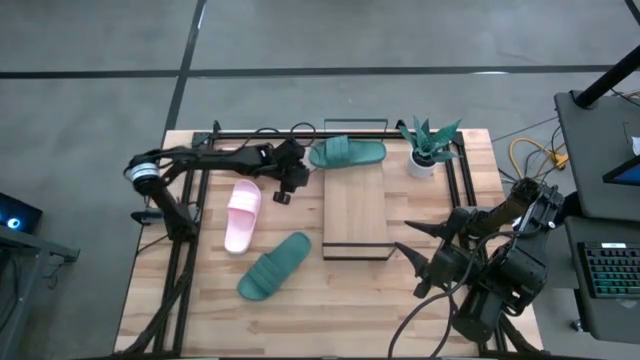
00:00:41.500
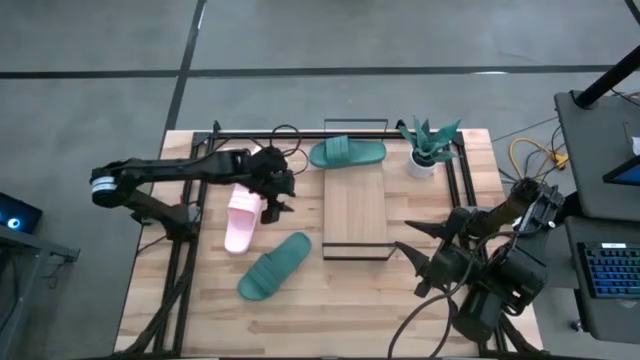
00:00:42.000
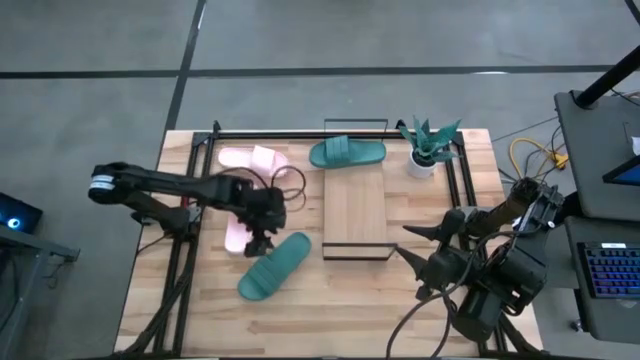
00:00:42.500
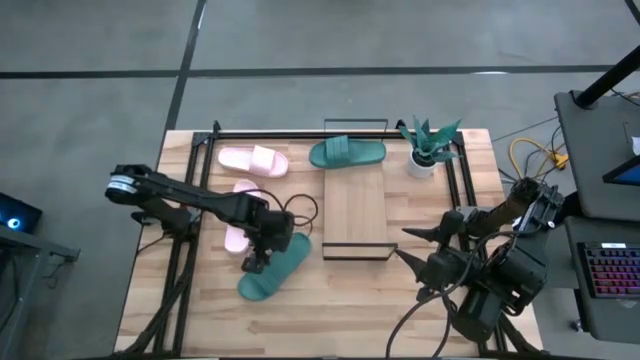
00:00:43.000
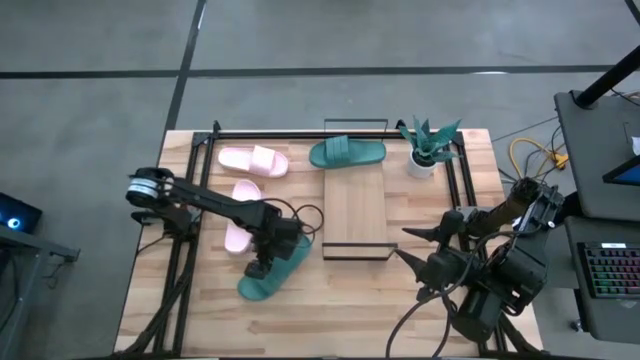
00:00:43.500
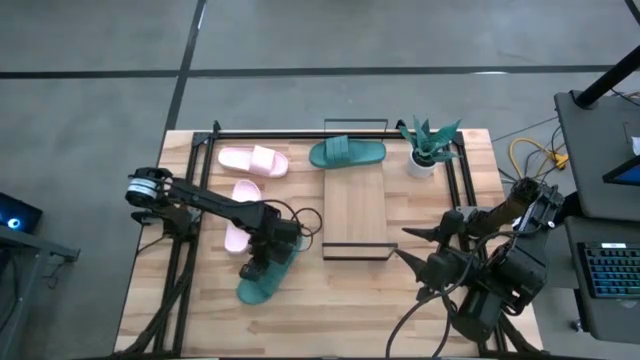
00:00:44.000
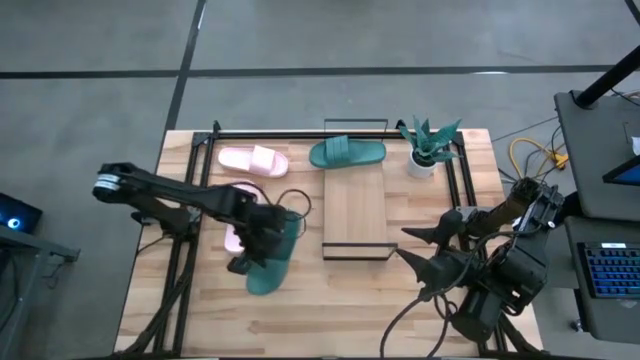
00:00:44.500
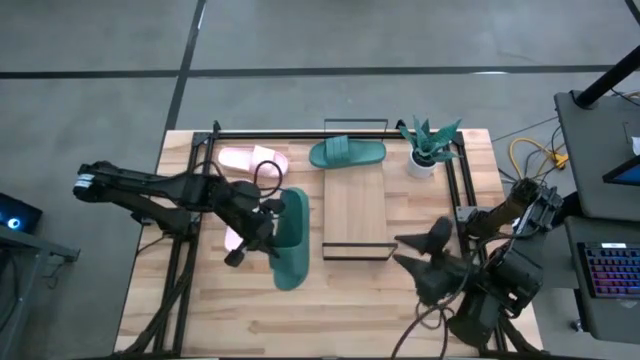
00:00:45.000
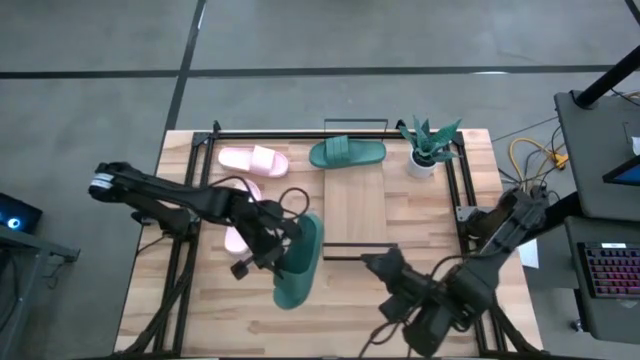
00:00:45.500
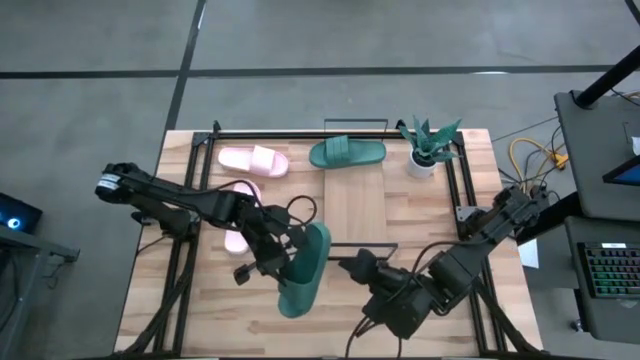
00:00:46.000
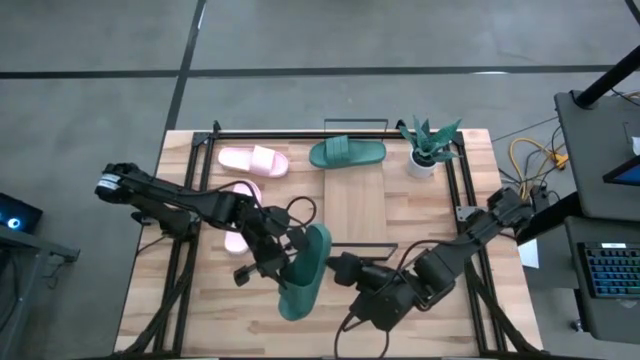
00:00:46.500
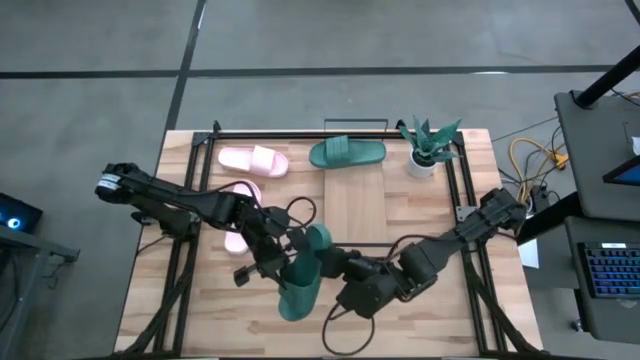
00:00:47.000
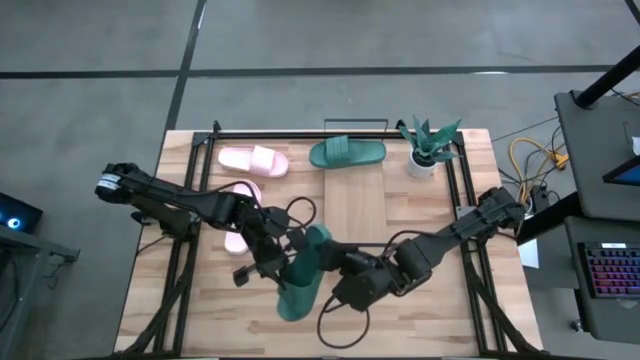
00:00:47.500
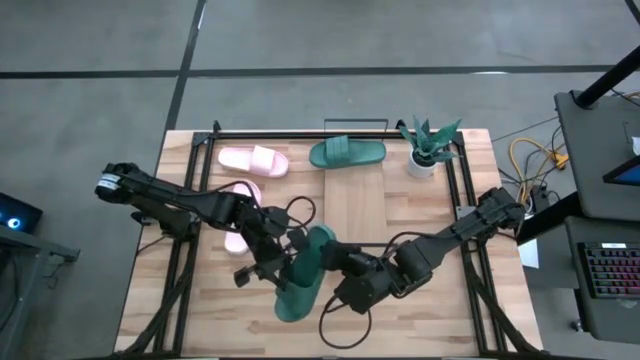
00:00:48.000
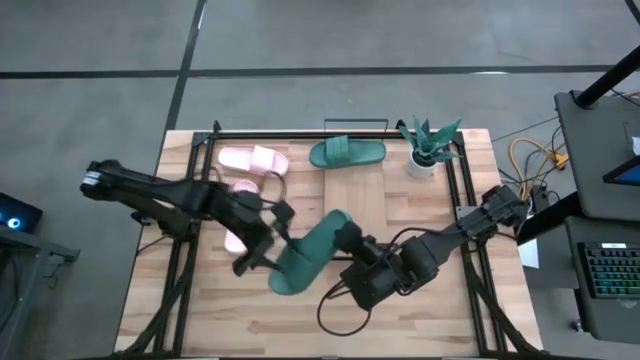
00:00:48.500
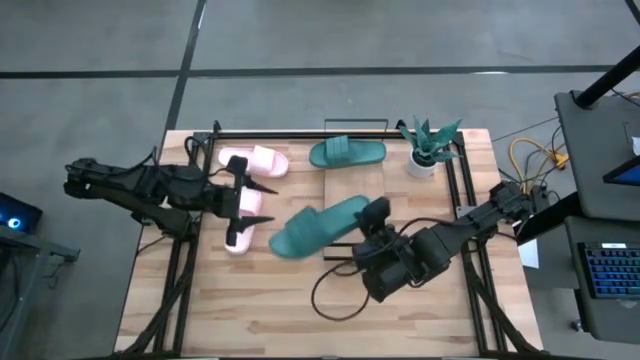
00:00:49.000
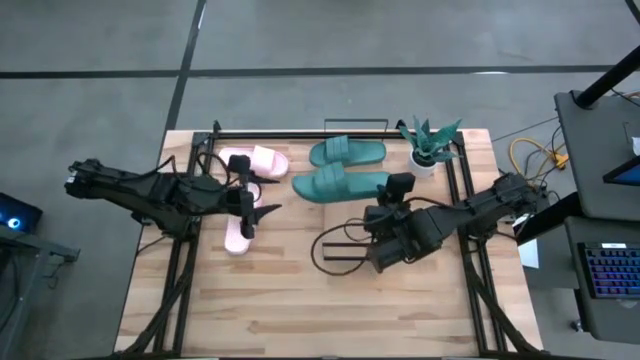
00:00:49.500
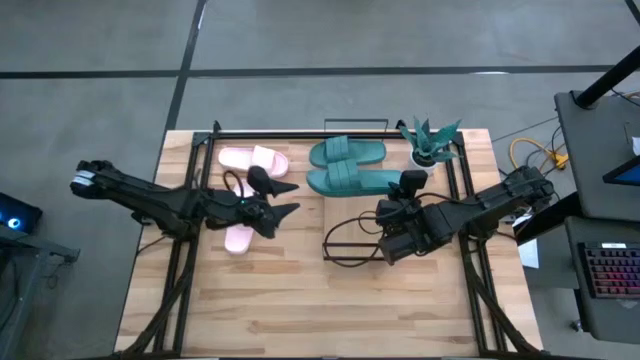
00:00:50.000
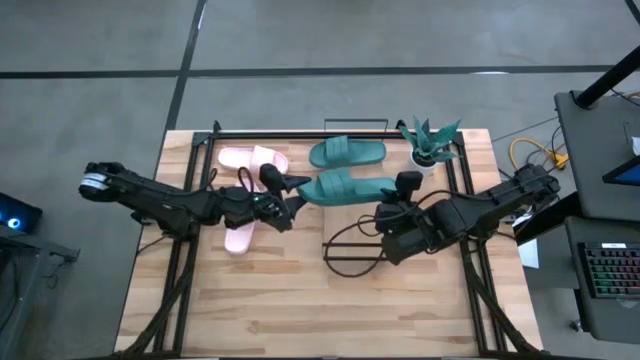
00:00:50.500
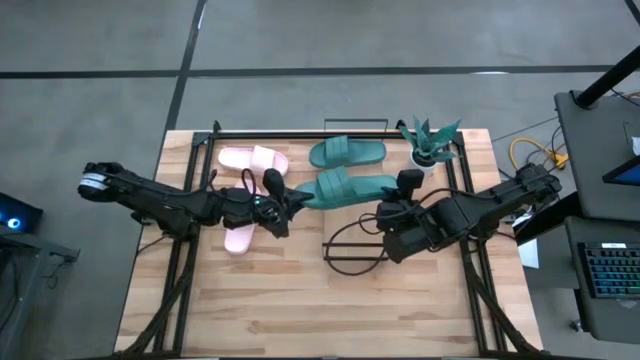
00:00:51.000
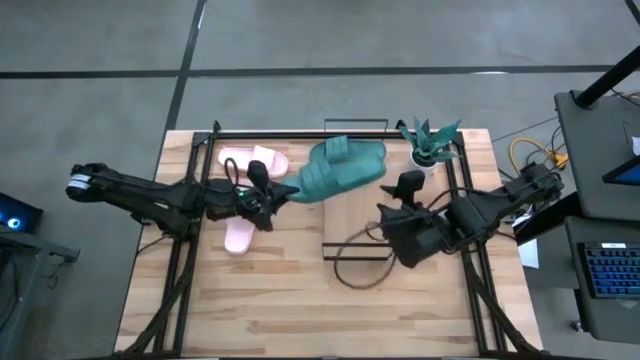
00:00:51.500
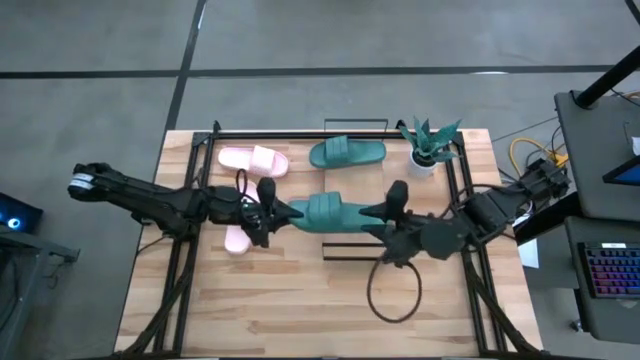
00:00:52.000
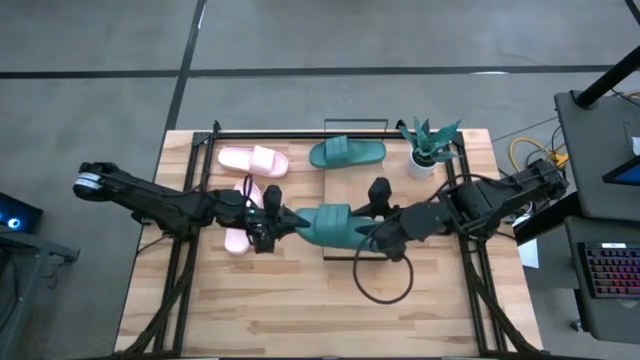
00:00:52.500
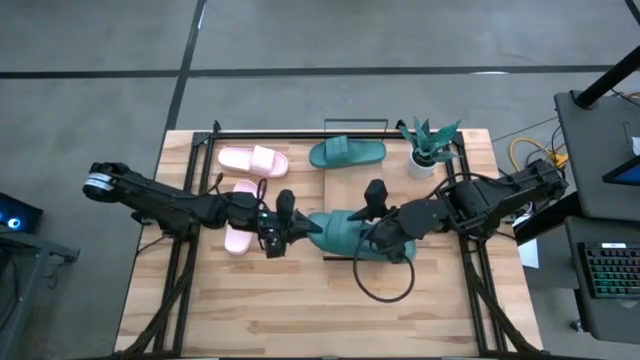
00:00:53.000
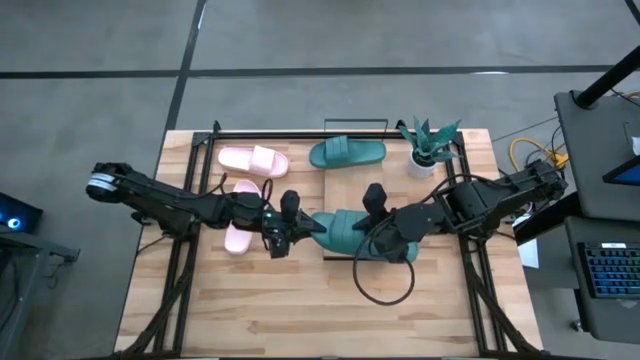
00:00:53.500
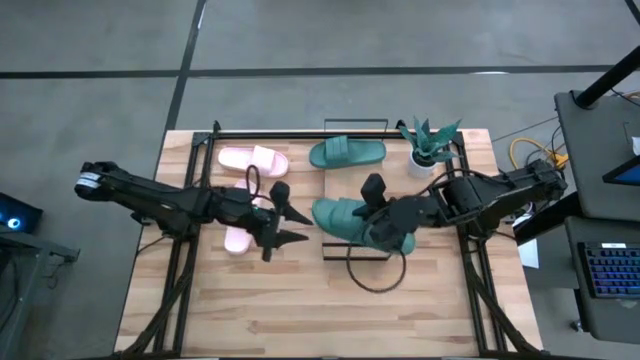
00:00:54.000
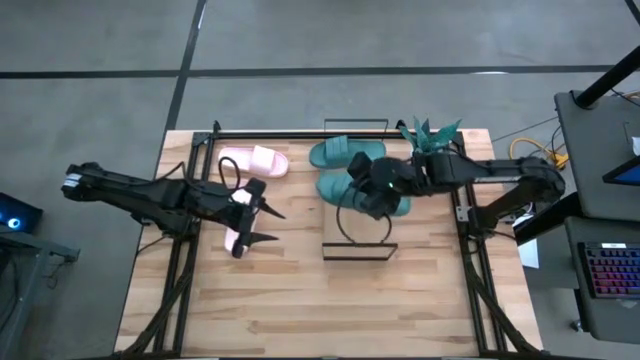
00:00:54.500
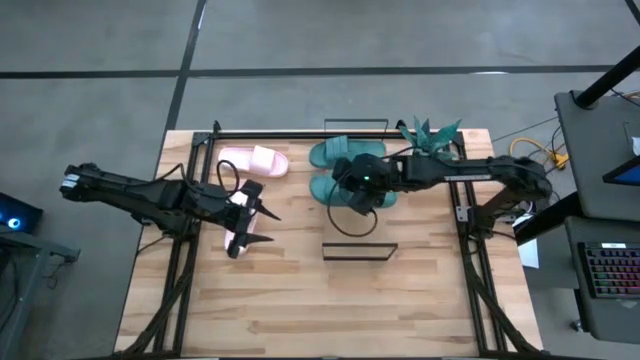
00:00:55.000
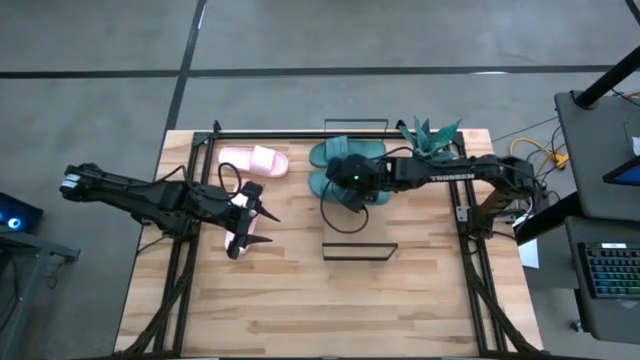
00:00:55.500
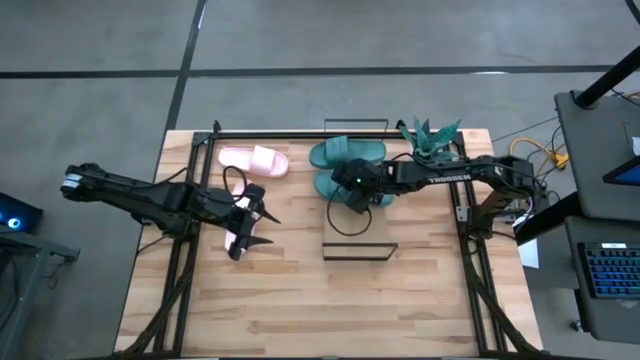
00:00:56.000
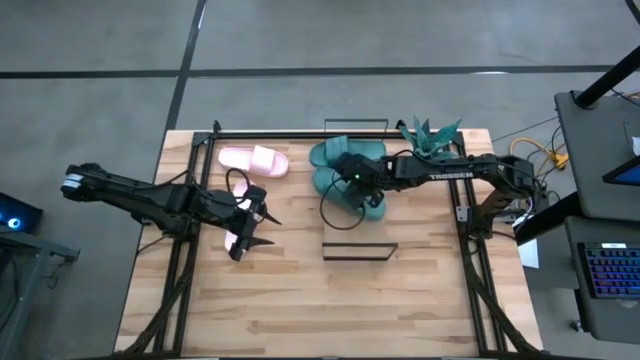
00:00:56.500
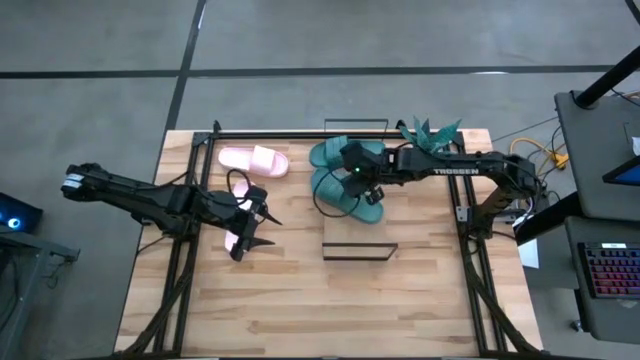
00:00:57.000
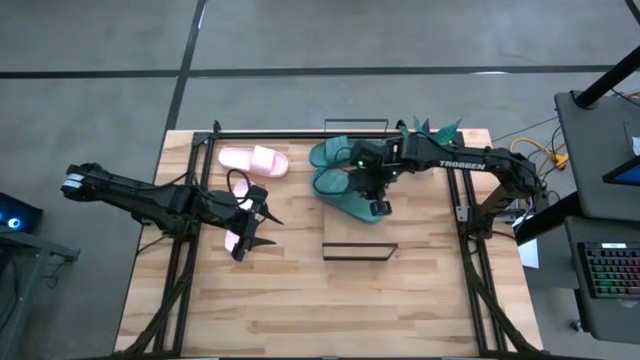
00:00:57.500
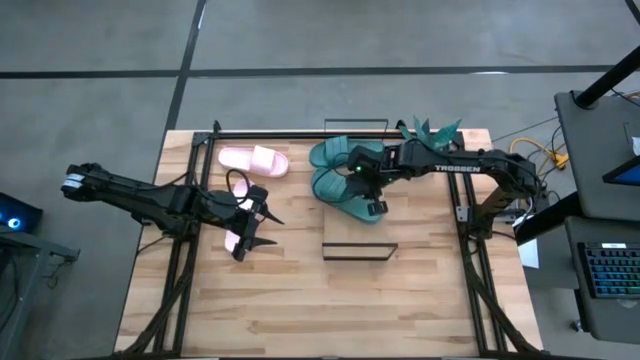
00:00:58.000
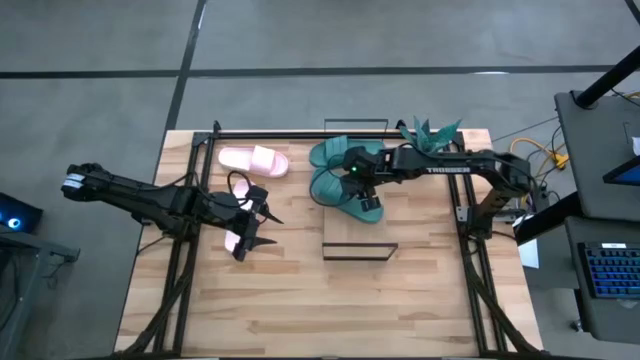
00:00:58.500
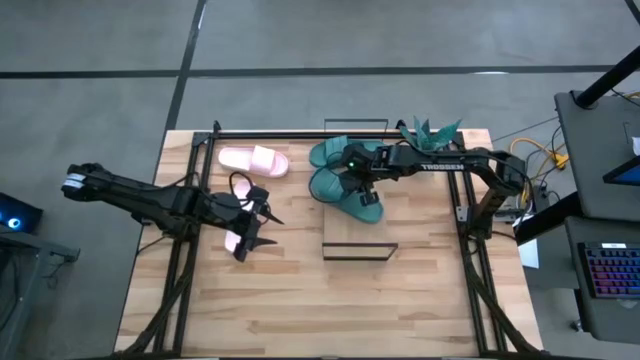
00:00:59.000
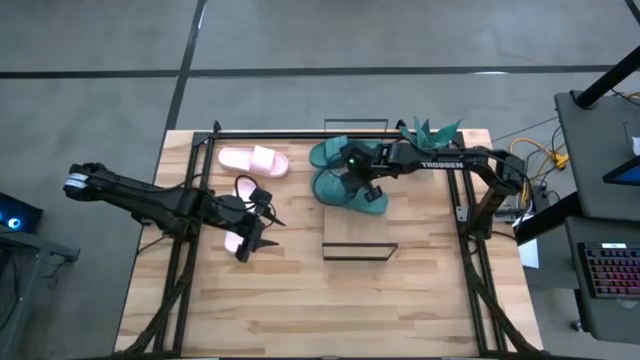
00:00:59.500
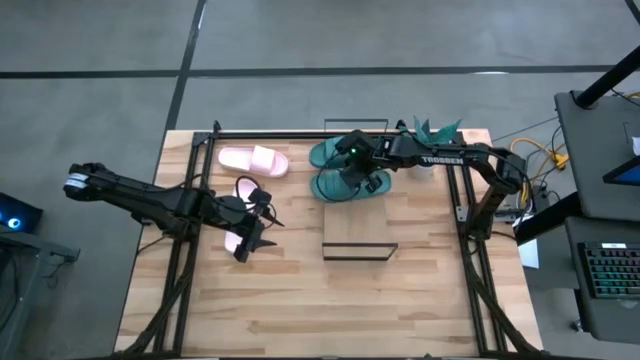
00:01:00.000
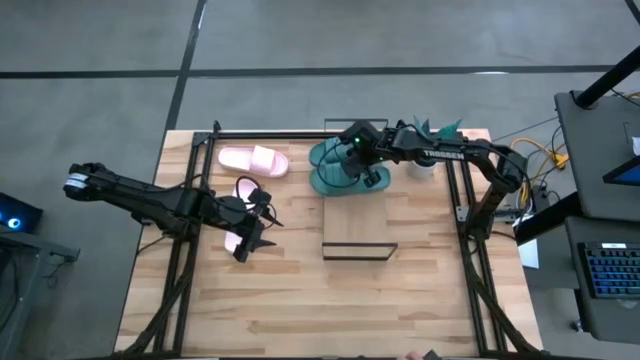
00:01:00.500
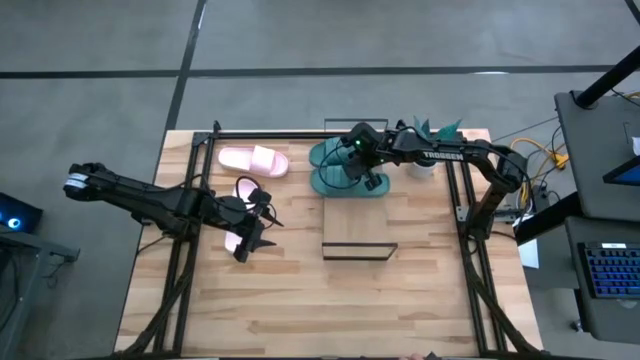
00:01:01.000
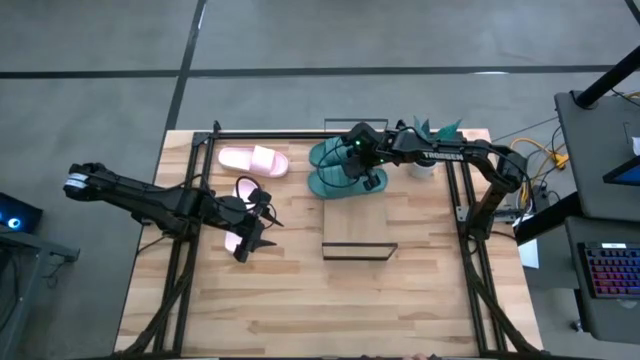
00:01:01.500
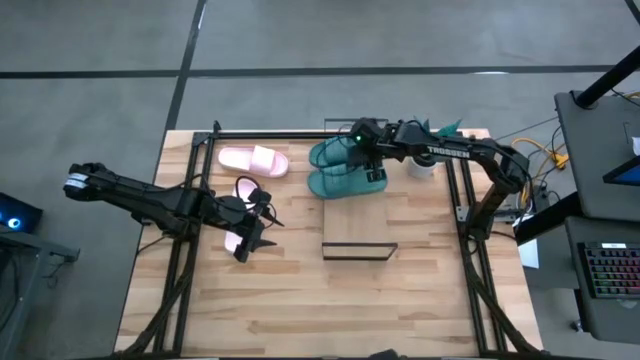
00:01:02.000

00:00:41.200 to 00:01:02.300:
Task: Pick and place slides into the shelf
Put the green slipper on the shelf
